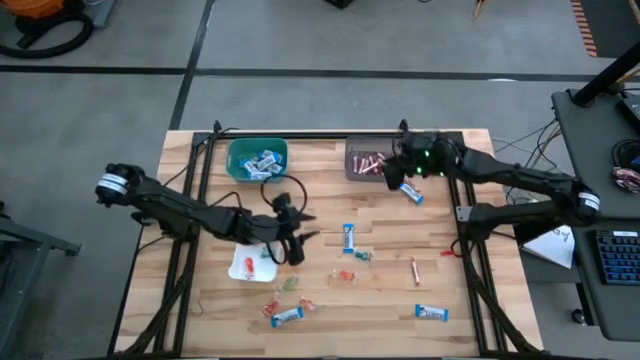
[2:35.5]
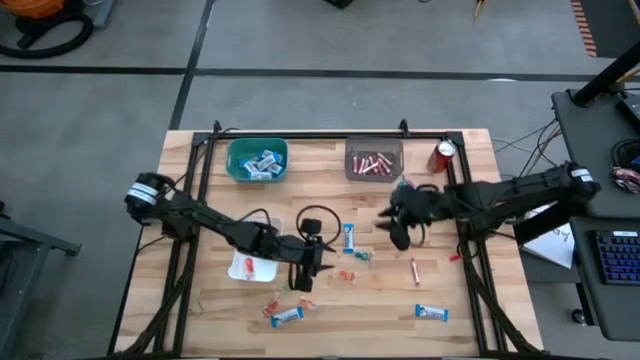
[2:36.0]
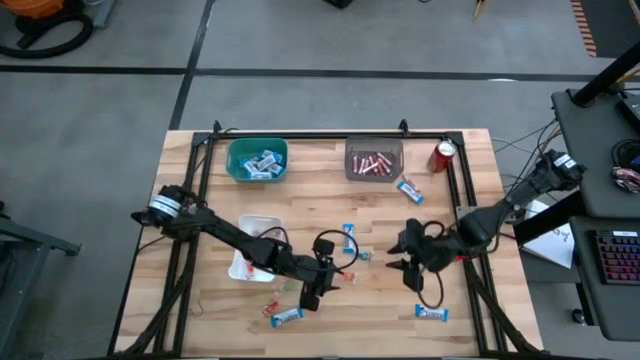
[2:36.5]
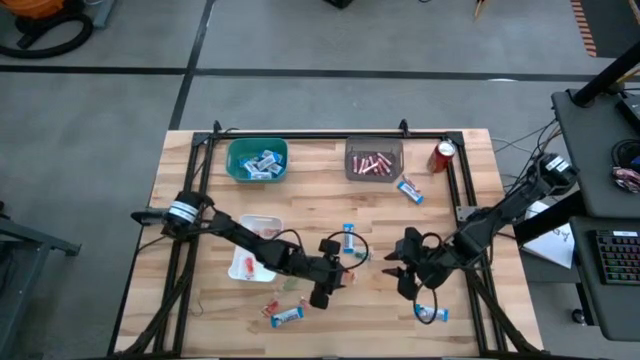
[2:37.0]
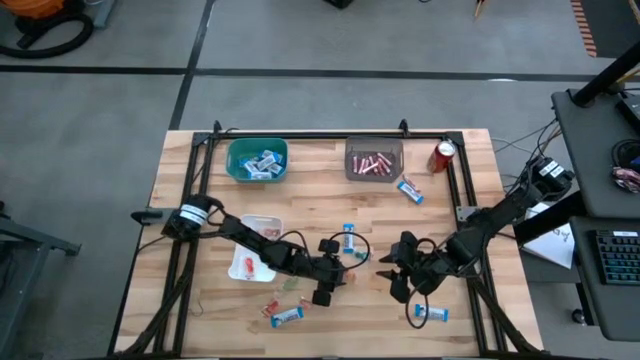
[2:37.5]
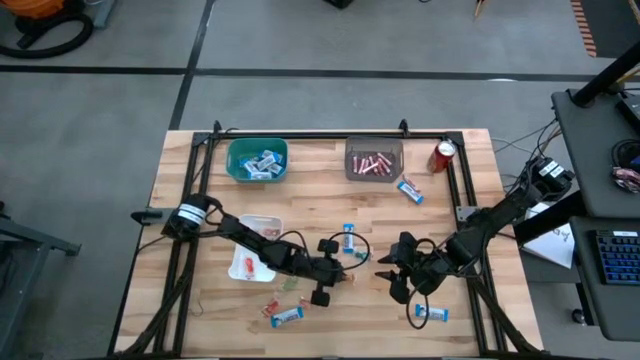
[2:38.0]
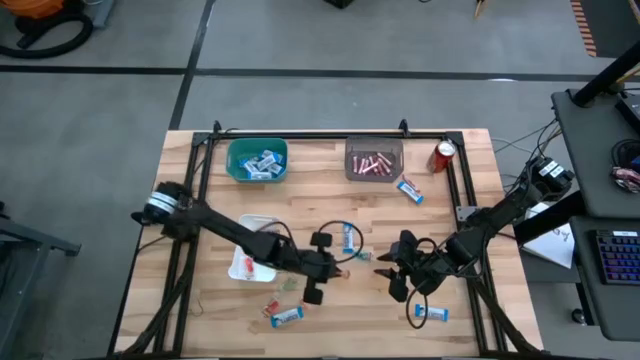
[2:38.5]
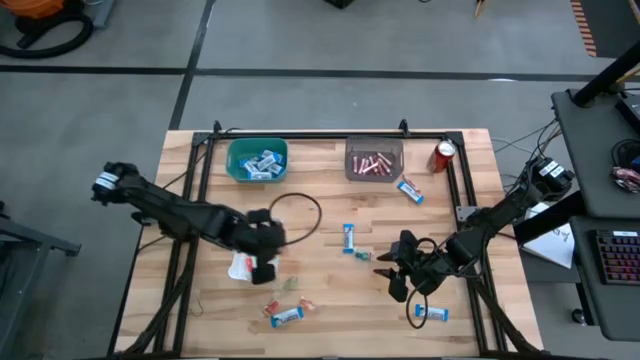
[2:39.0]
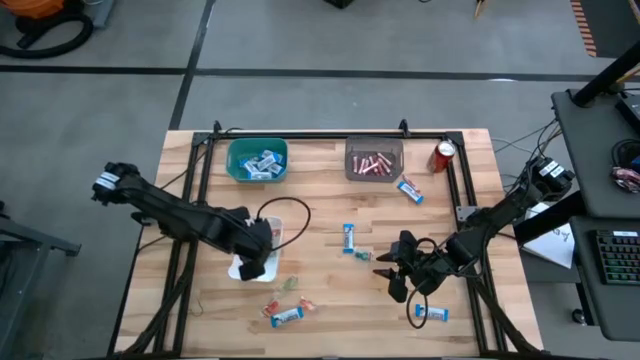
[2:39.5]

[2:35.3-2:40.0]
Task: Sort candy
Put the orange gummy candy into the white bin

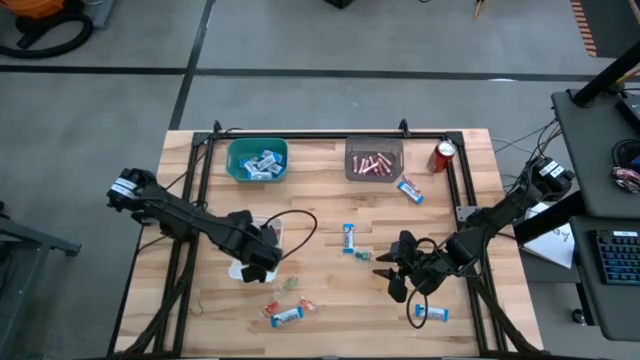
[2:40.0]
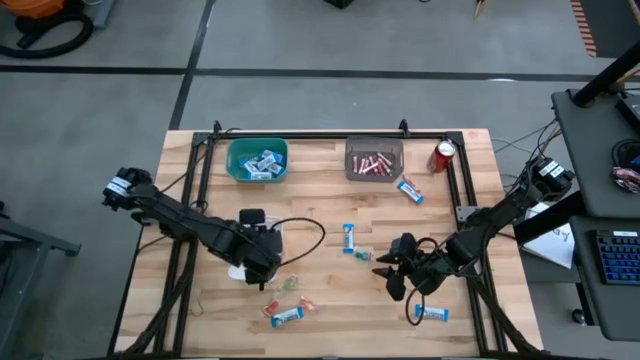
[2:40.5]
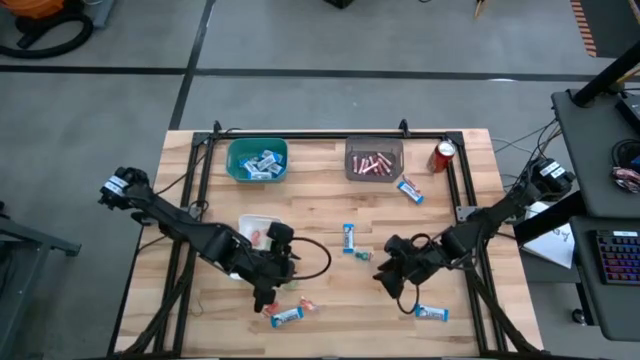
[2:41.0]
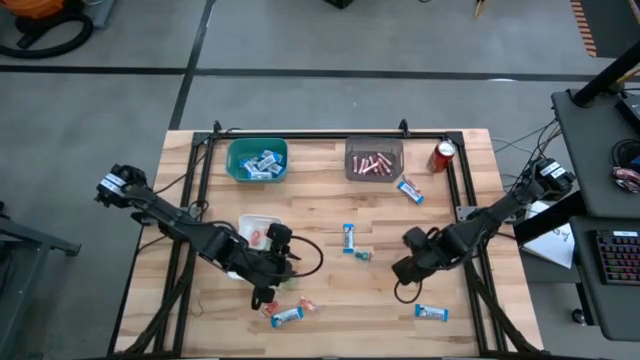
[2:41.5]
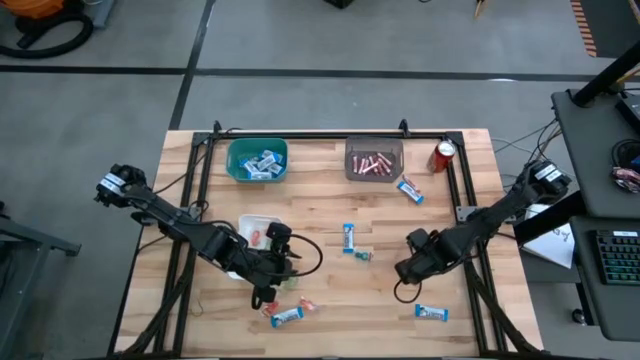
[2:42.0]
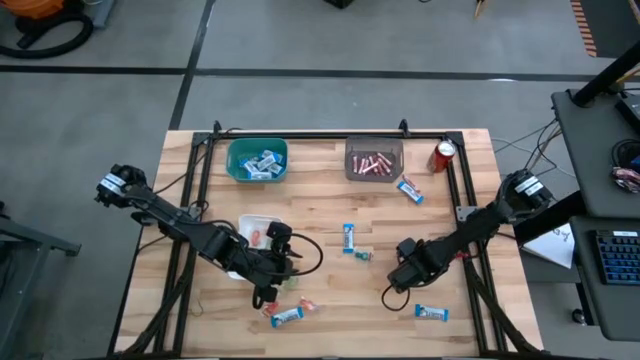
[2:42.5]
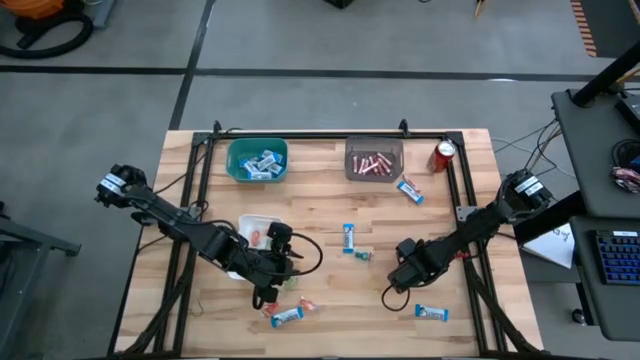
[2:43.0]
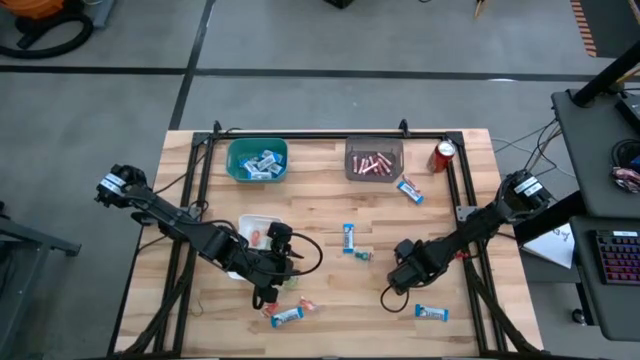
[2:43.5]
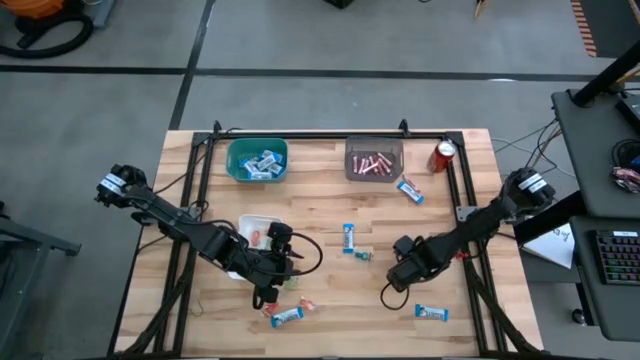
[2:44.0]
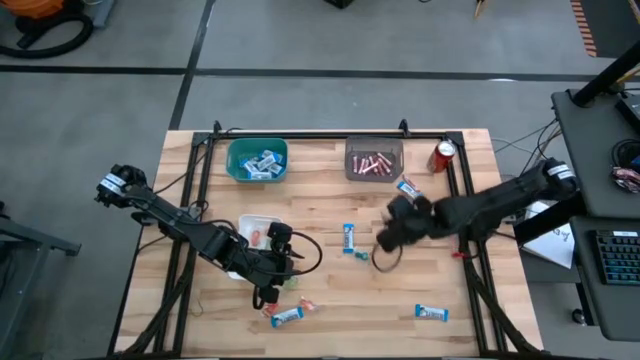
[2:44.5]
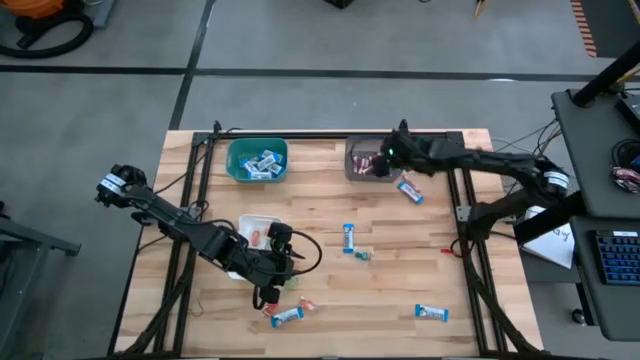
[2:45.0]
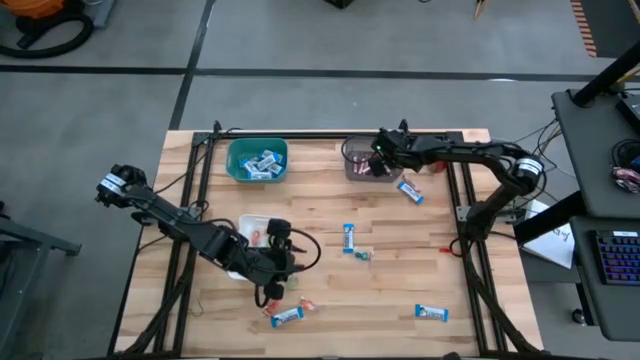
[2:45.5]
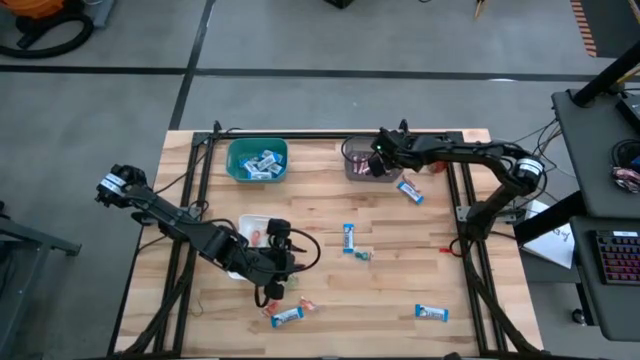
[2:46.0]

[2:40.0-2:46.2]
Put the transparent candy rolls into the black bin

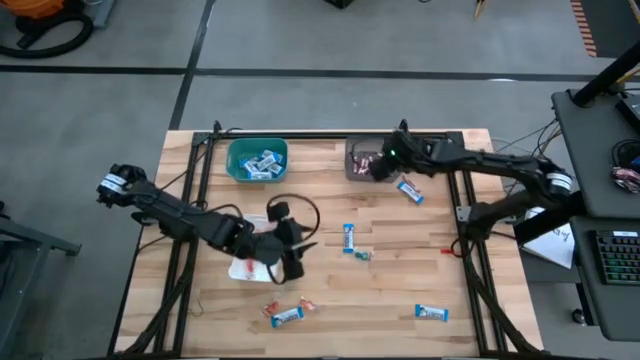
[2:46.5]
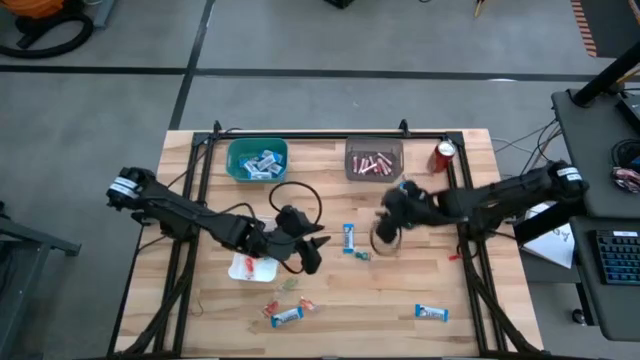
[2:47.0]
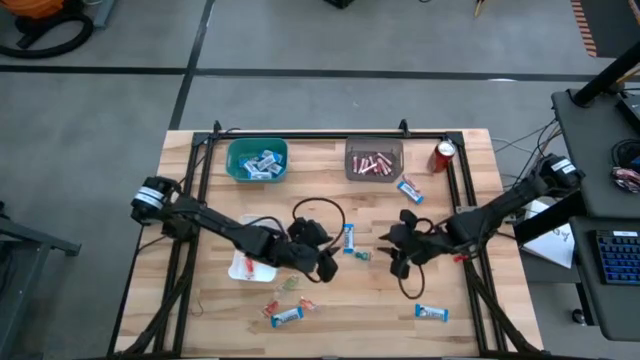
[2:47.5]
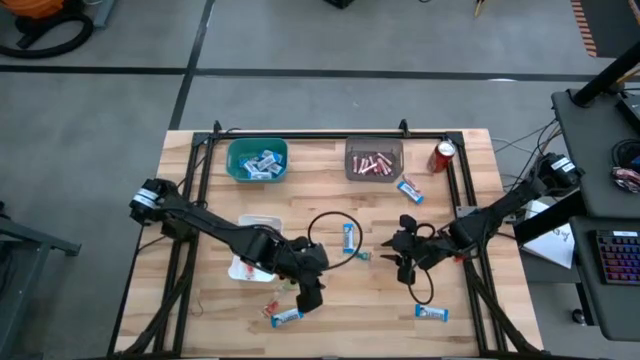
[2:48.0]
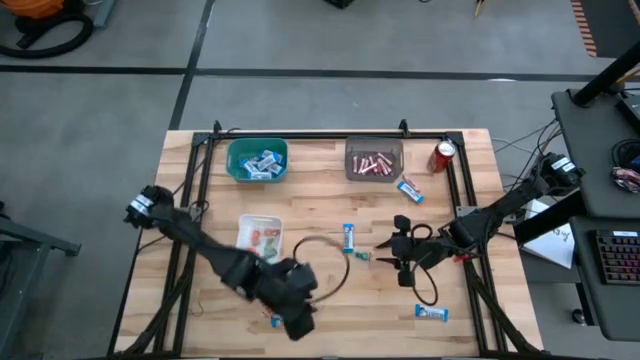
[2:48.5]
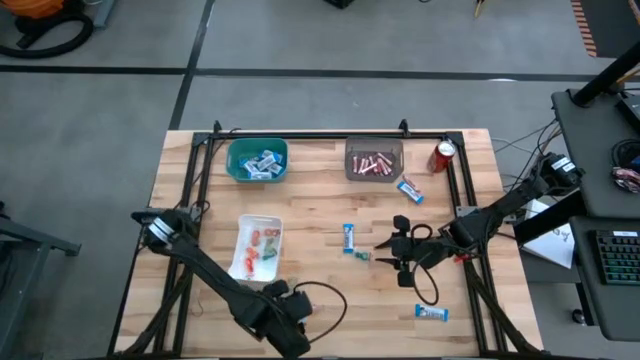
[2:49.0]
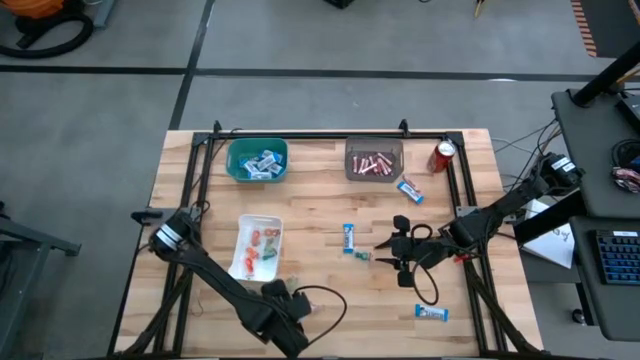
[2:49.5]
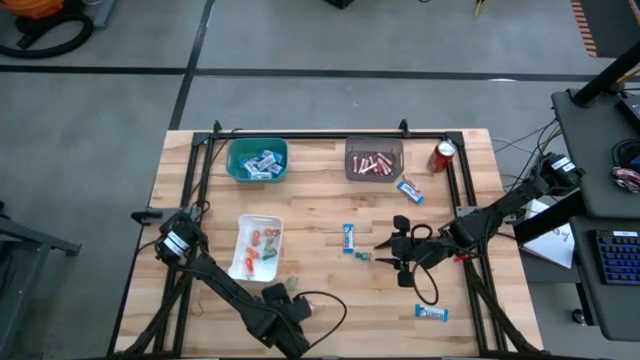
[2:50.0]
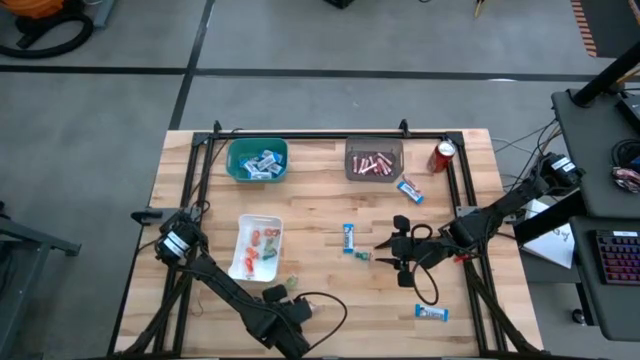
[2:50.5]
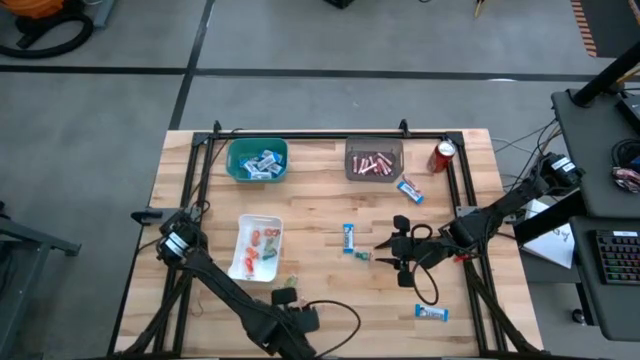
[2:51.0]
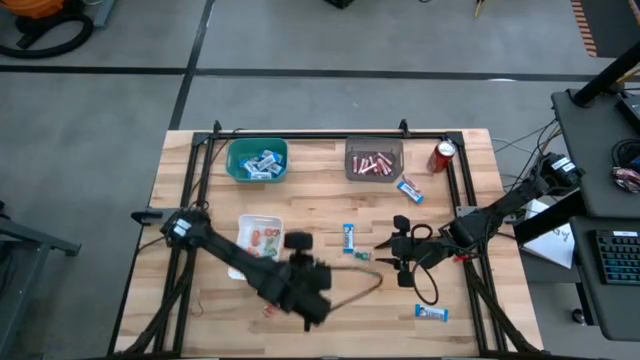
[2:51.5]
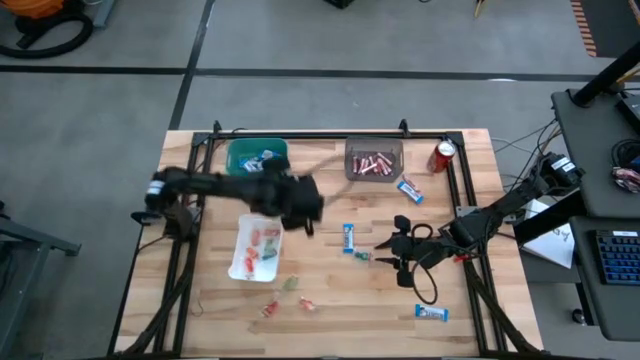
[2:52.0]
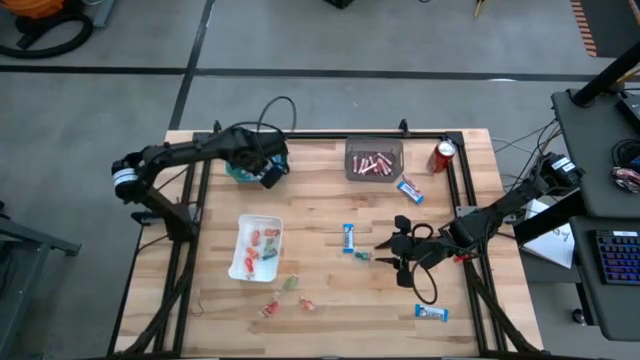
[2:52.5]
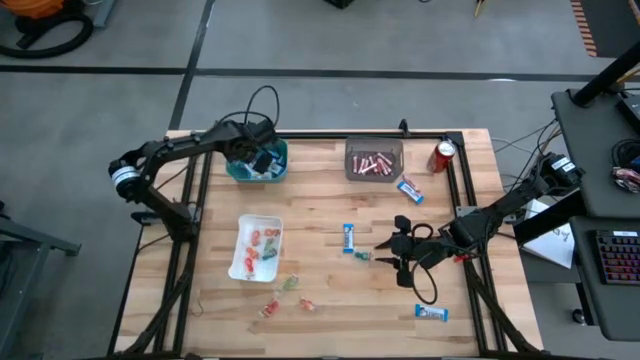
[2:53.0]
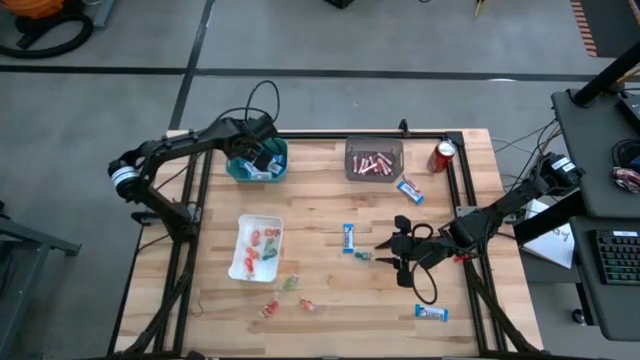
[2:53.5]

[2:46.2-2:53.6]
Put the white chocolate bar into the green bin
